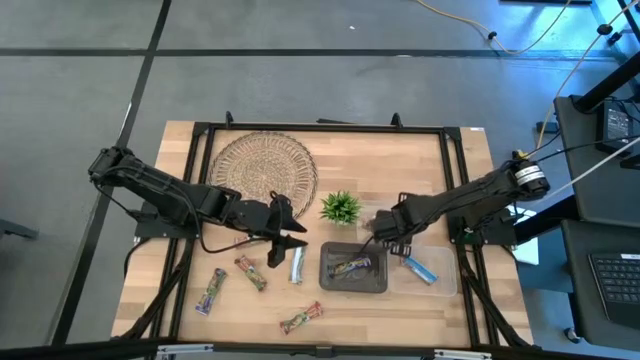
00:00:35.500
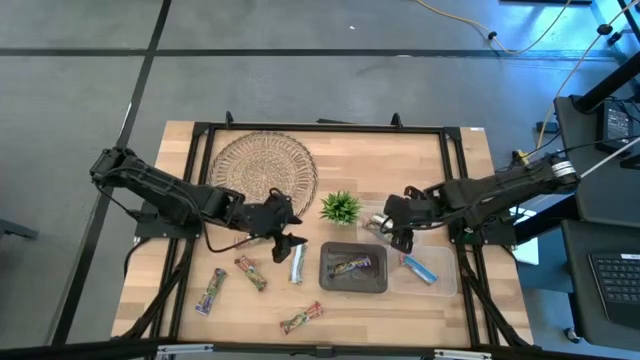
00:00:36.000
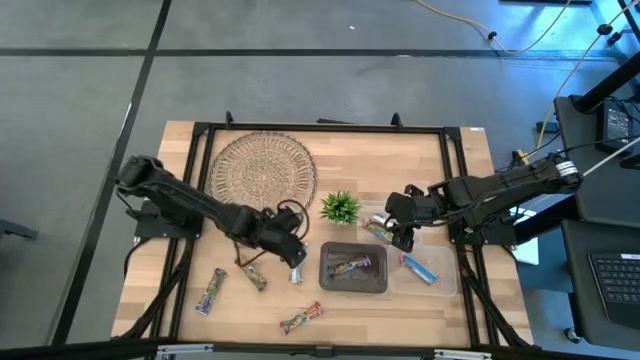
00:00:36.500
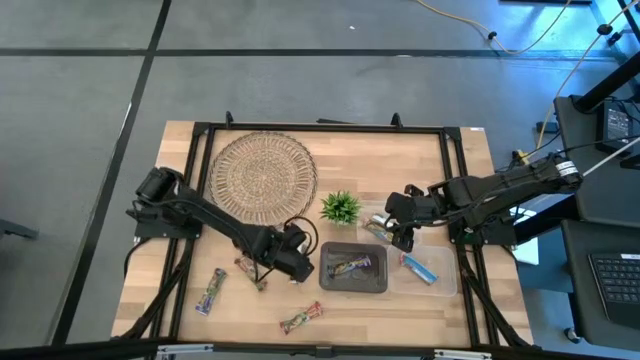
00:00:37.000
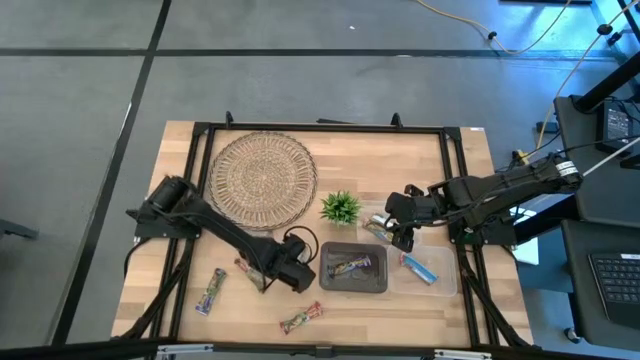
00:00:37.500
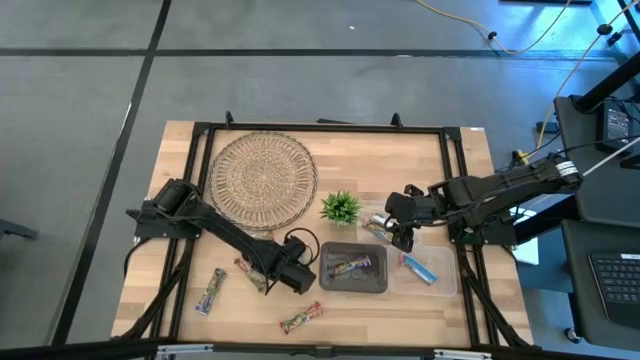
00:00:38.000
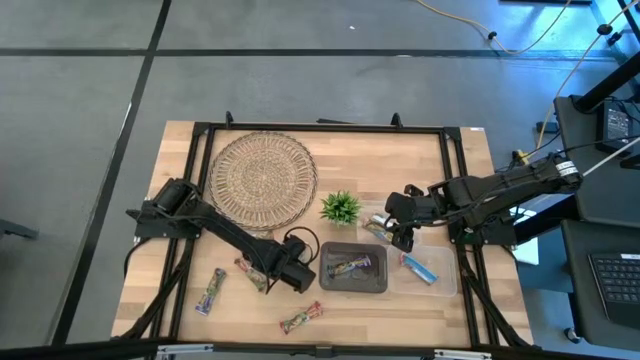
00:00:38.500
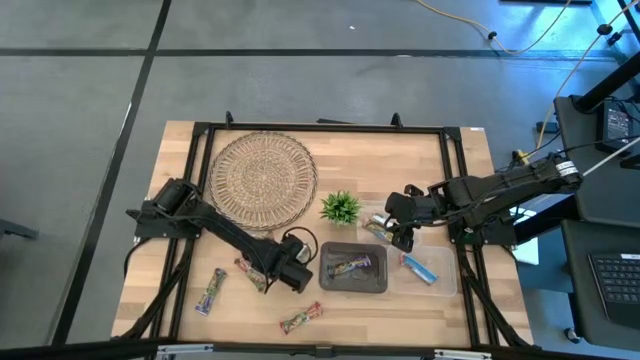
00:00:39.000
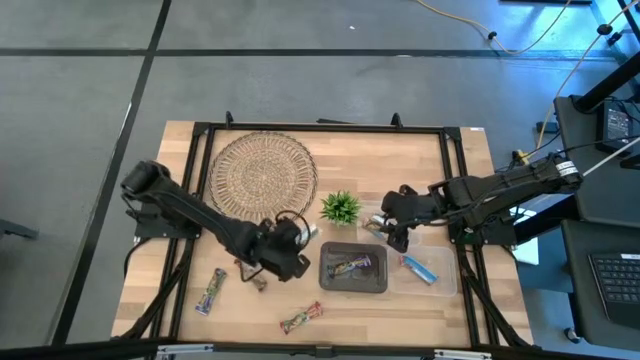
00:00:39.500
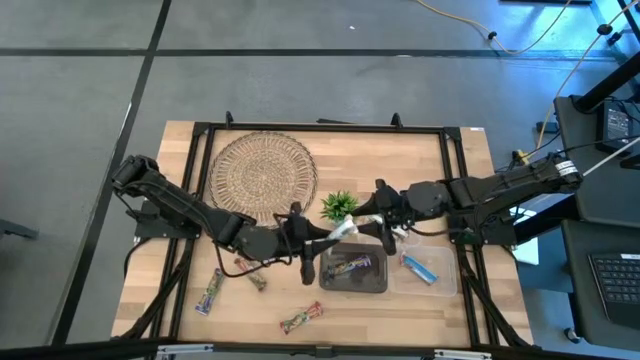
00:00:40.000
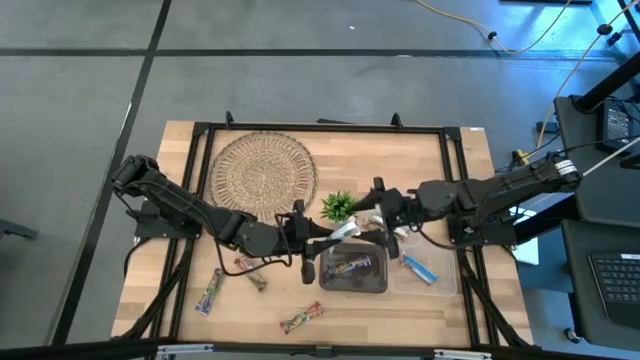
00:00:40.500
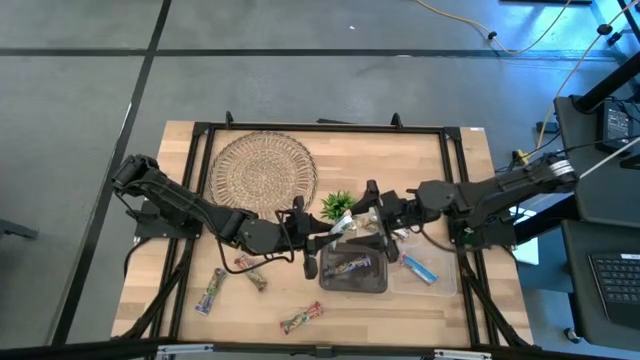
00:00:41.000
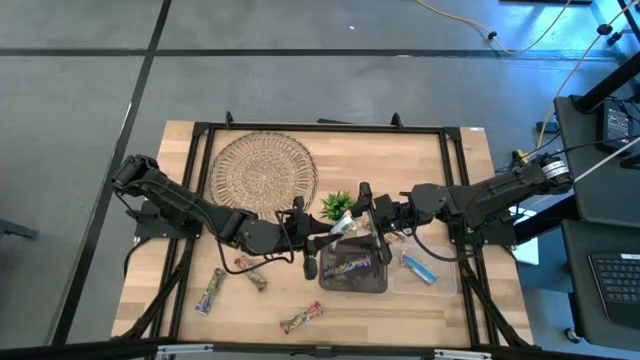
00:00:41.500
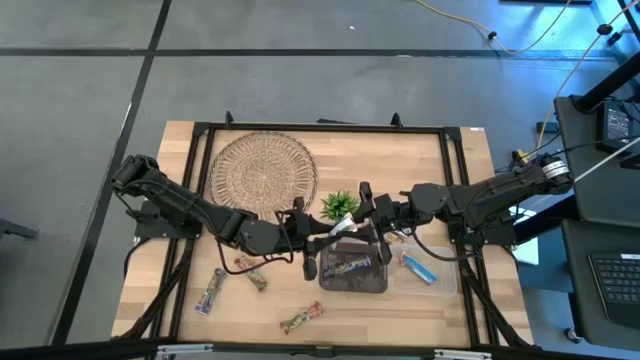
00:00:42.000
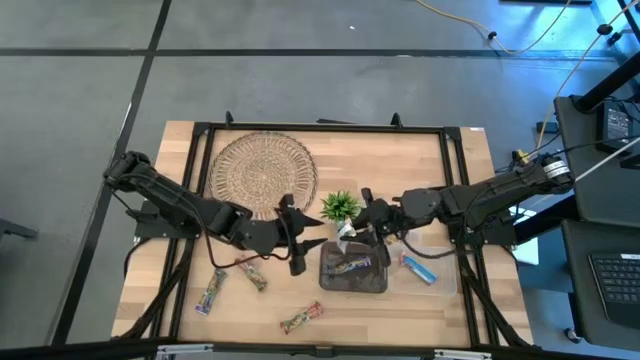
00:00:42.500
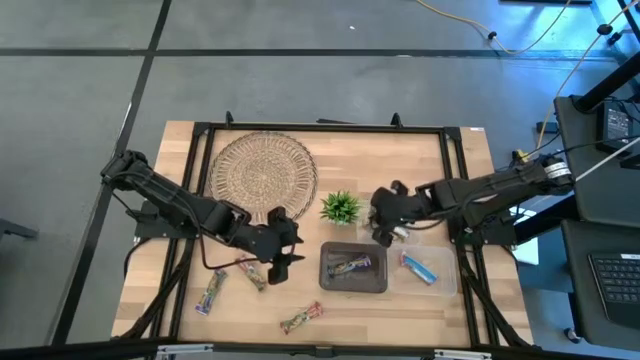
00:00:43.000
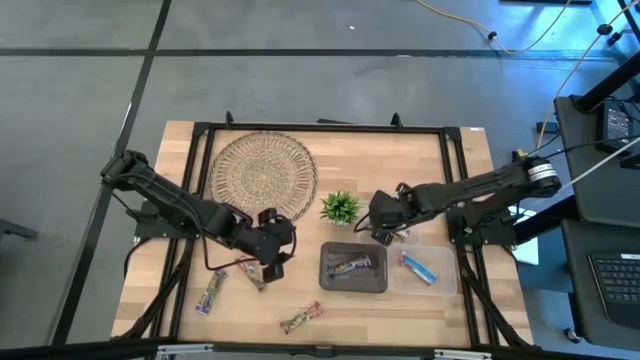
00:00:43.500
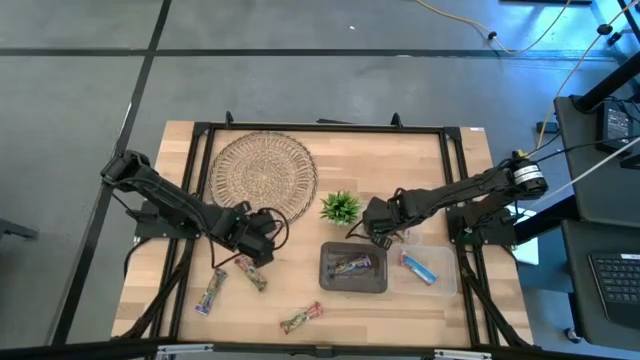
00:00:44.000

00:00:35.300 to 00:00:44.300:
Task: Pick and place Granola Bars by type
Put the orange granola bar into the top transparent bin

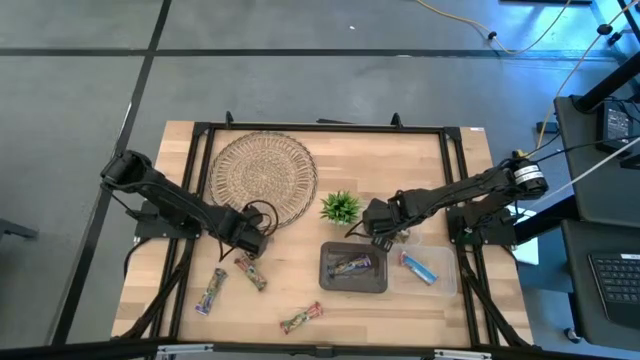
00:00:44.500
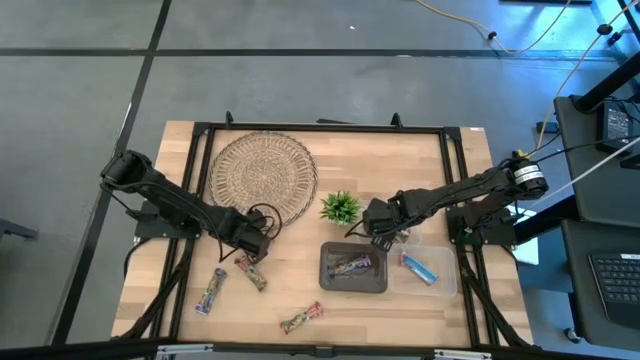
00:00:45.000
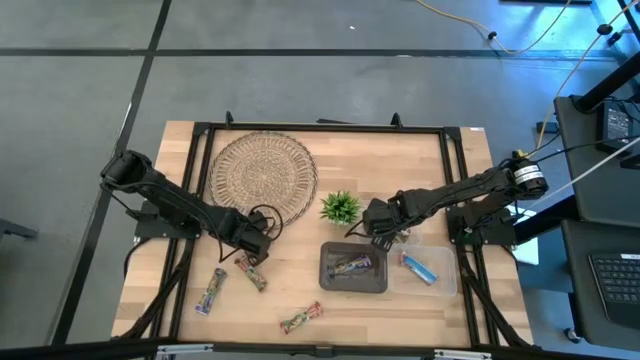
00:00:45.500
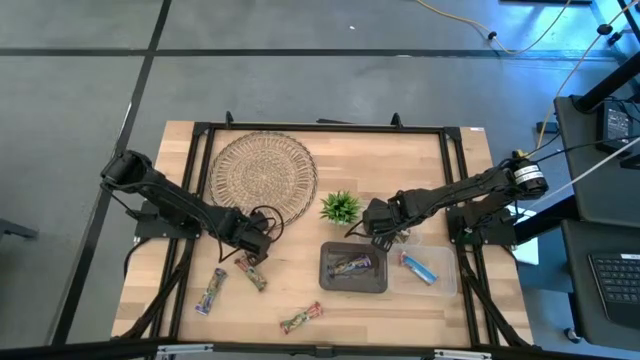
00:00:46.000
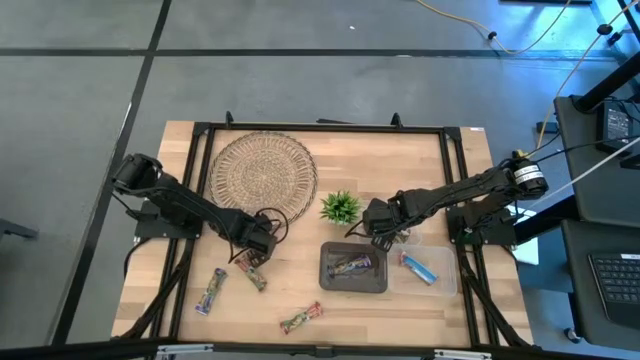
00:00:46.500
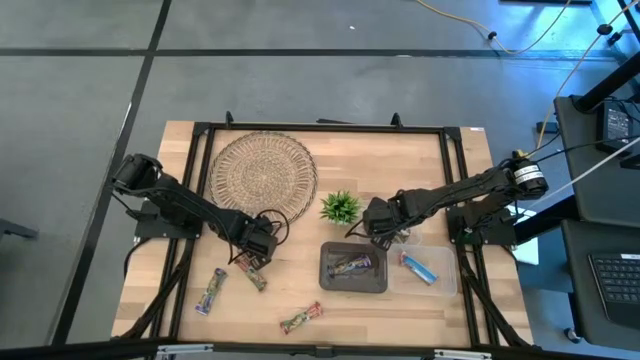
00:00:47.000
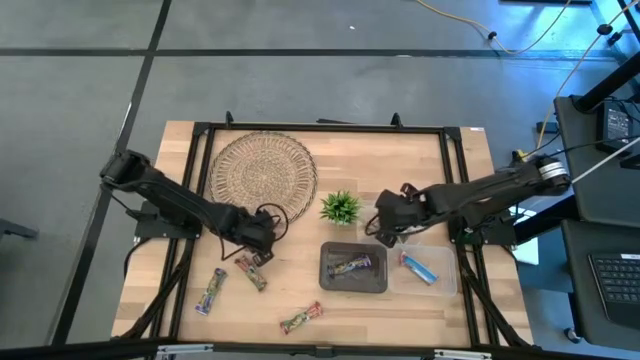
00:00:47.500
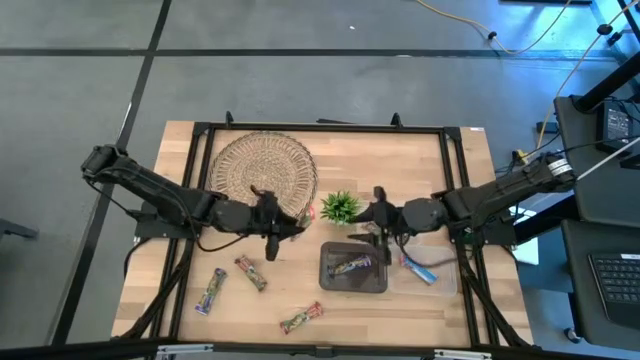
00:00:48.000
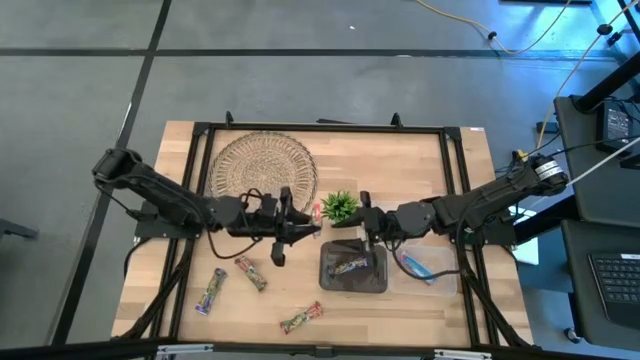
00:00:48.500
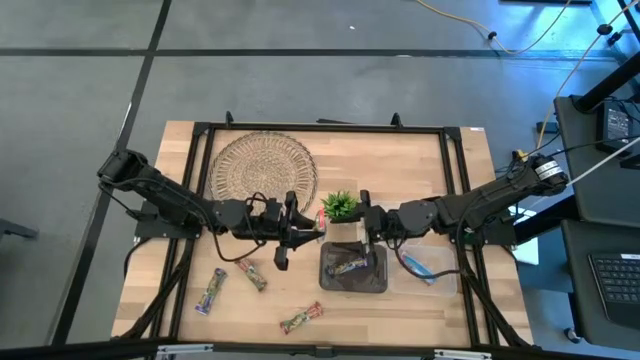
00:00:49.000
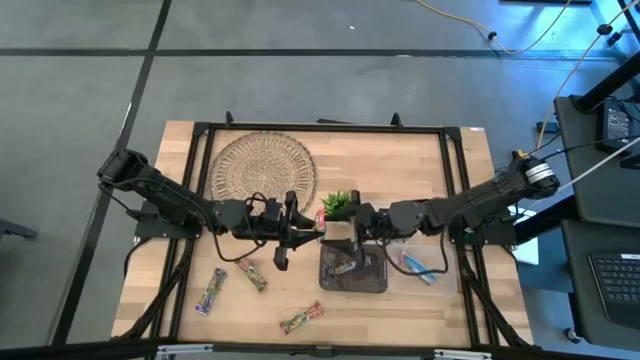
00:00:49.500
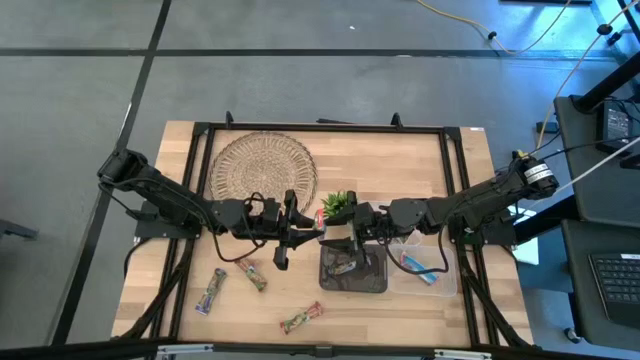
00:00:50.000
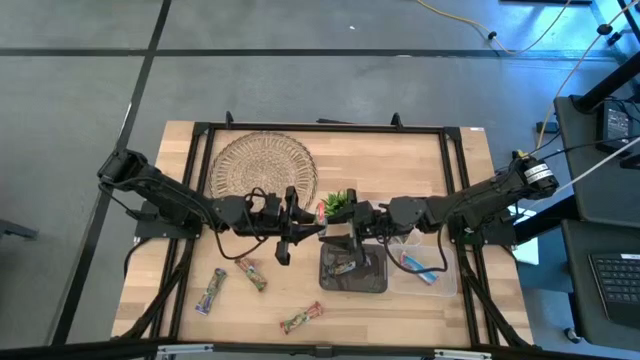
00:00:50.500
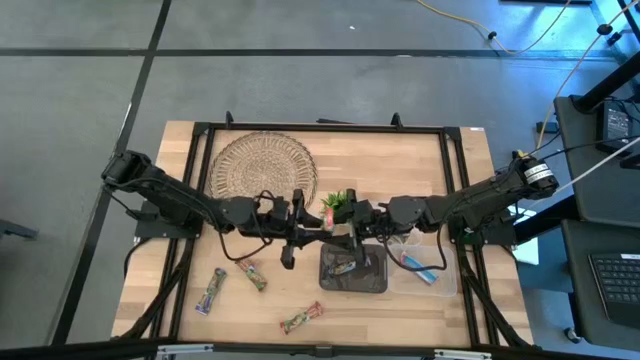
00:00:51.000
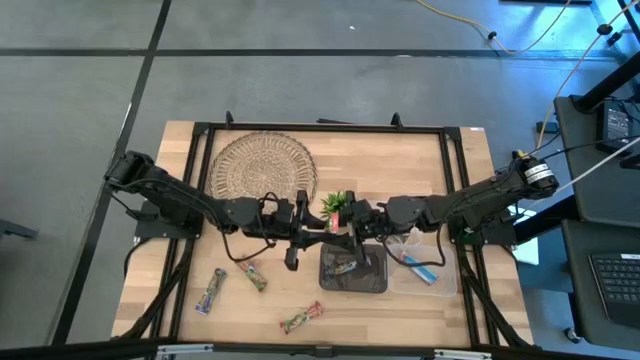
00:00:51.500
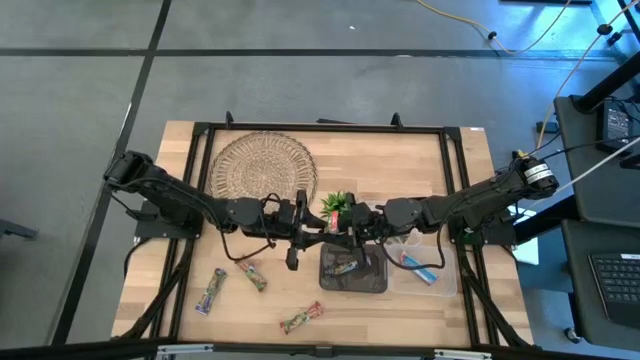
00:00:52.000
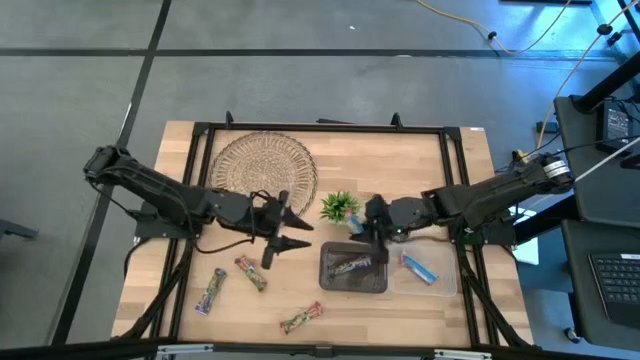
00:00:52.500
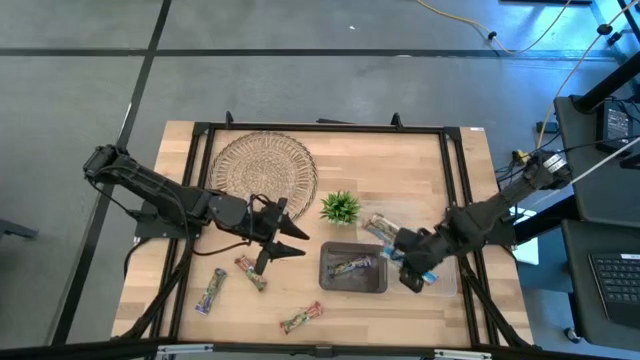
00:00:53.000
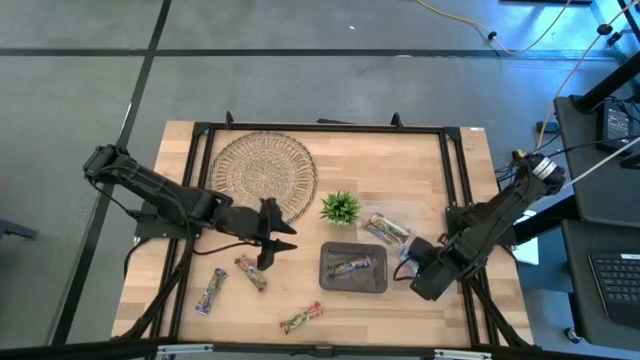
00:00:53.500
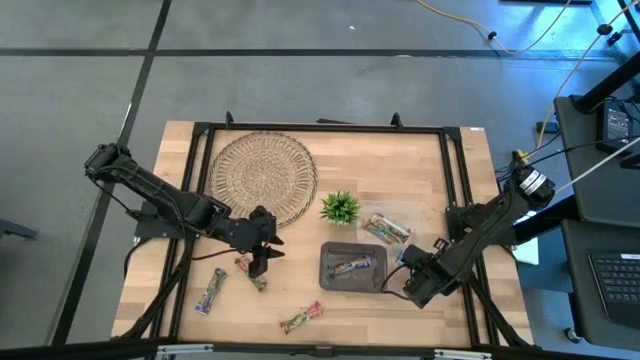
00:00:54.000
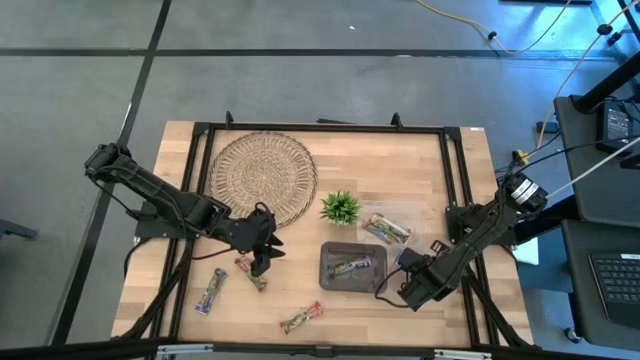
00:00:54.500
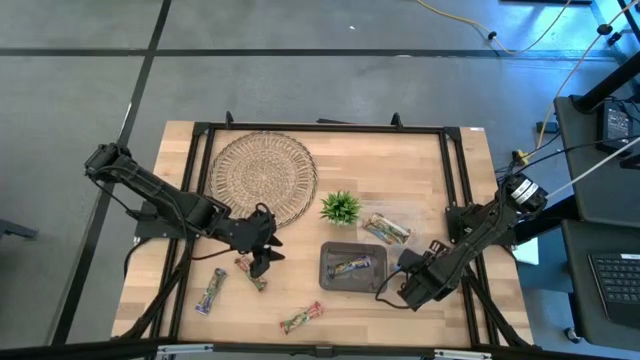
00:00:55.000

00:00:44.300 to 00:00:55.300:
Put the red granola bar into the bottom transparent bin

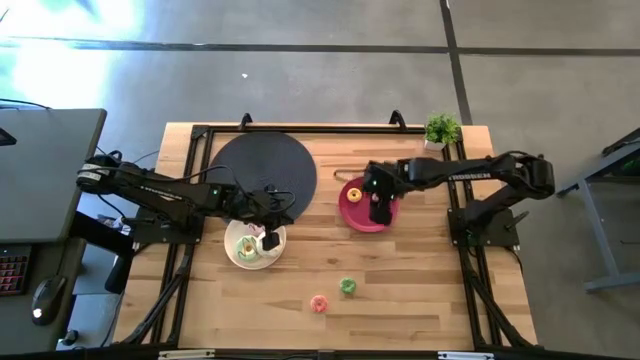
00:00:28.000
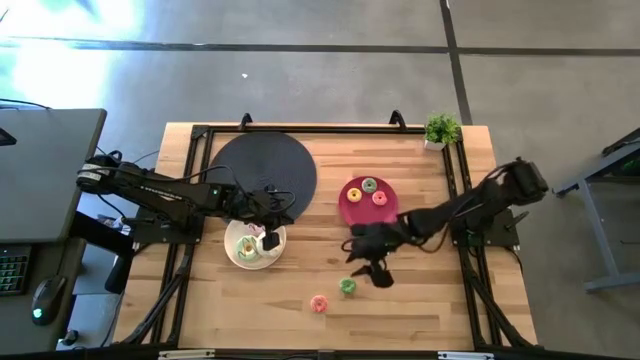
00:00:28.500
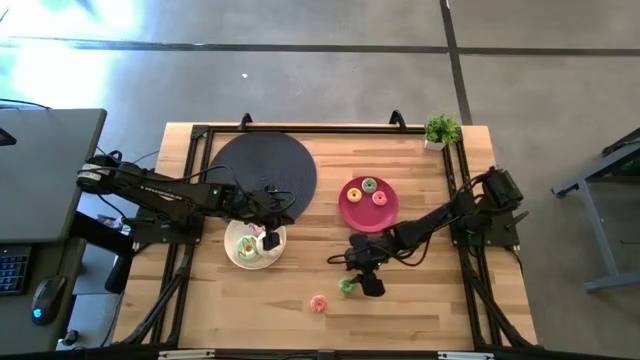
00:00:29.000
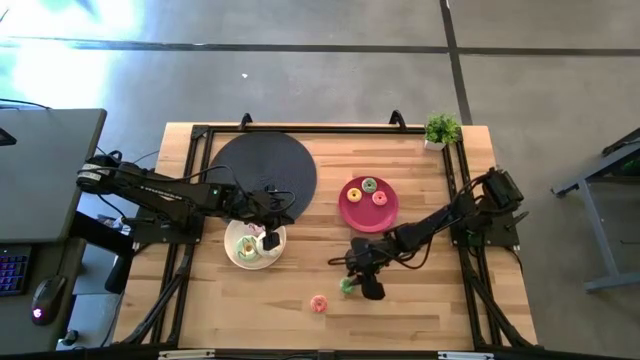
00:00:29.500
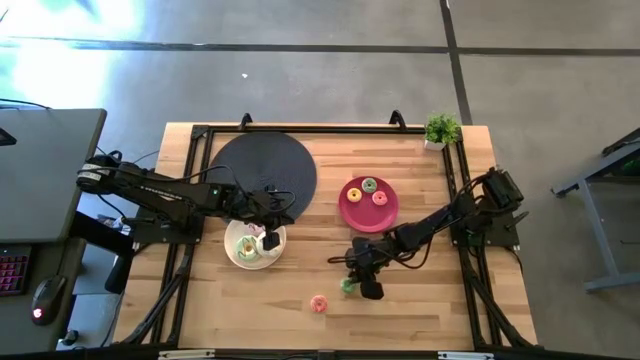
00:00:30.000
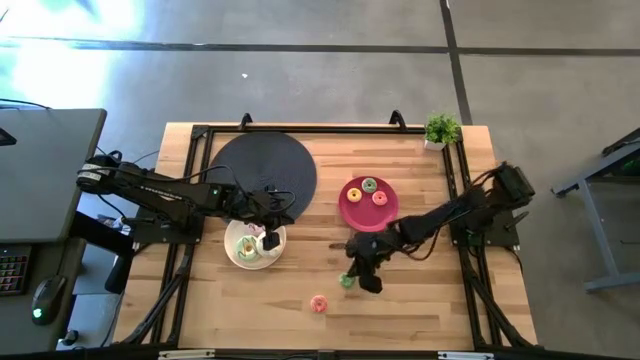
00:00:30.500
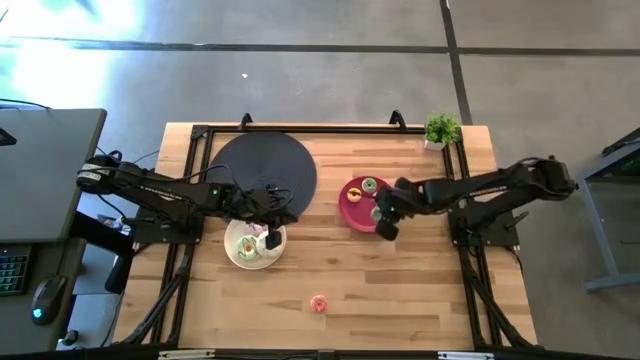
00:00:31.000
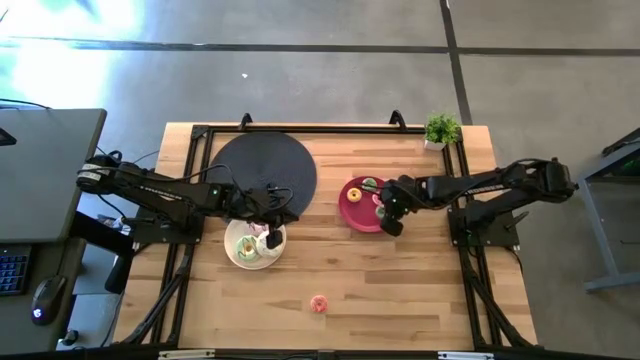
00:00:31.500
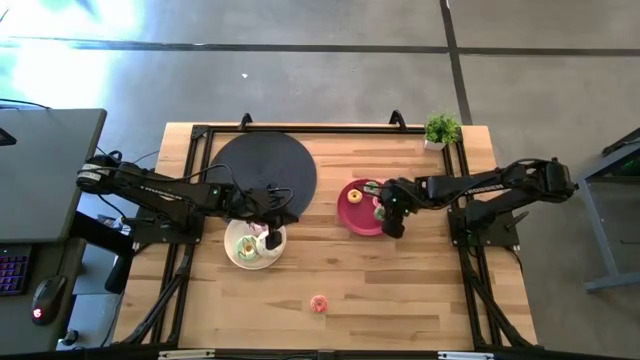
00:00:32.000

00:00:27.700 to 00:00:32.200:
Task: Pick & Place donuts
Put the small green donut on the red plate
